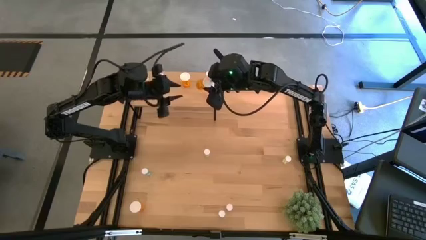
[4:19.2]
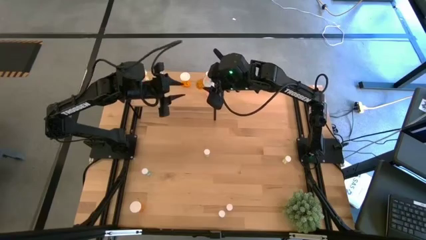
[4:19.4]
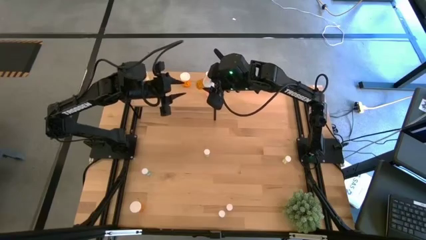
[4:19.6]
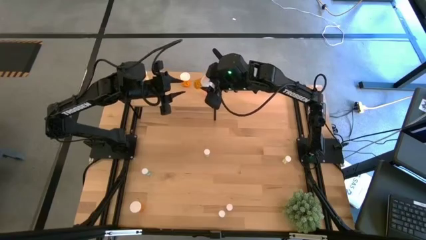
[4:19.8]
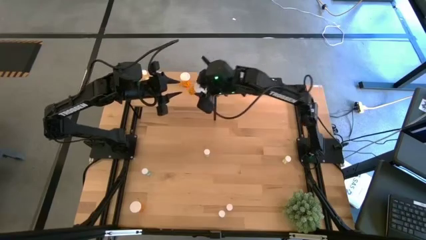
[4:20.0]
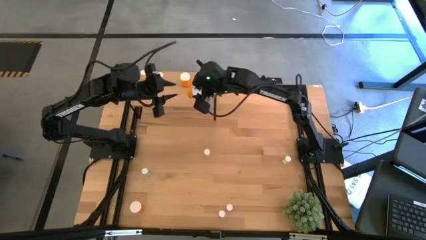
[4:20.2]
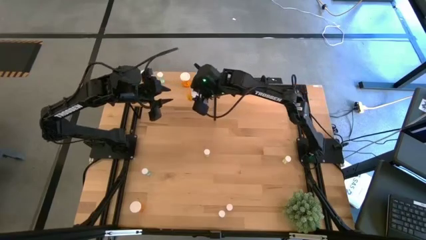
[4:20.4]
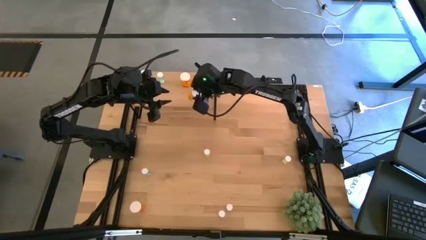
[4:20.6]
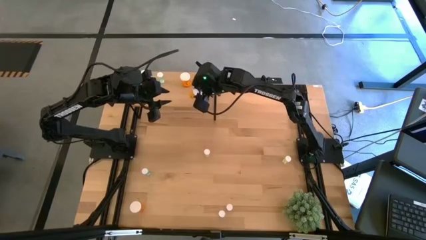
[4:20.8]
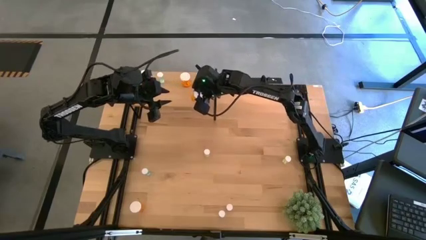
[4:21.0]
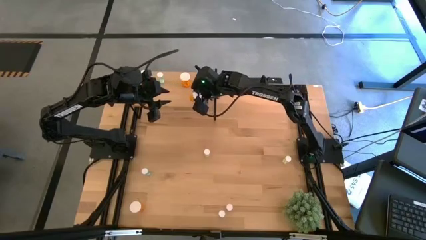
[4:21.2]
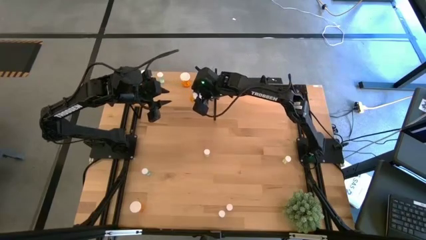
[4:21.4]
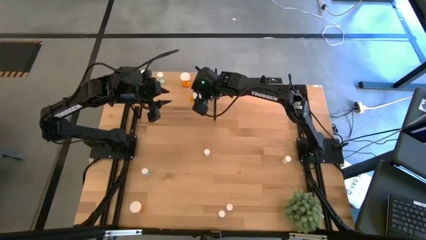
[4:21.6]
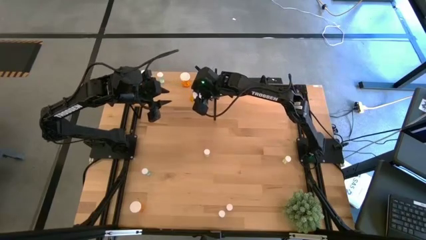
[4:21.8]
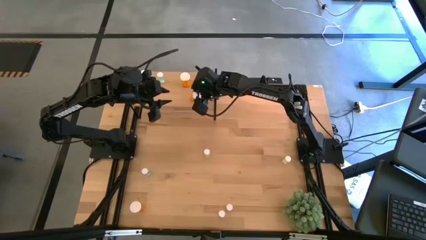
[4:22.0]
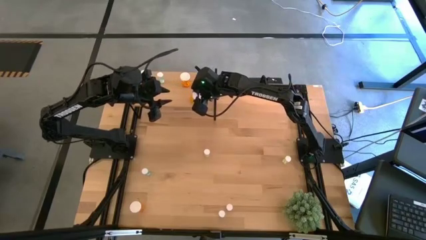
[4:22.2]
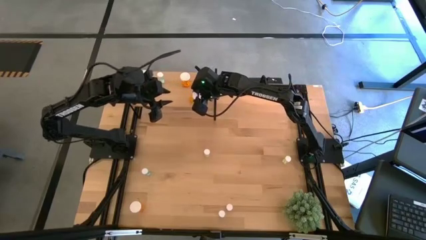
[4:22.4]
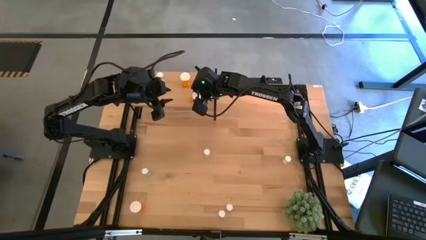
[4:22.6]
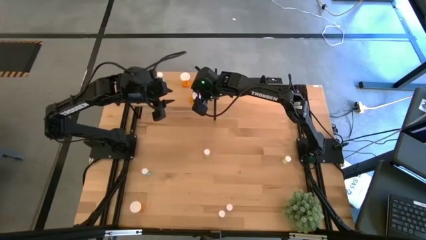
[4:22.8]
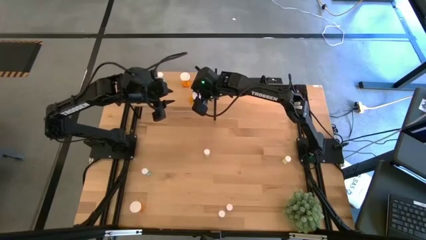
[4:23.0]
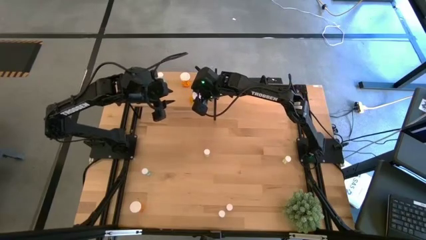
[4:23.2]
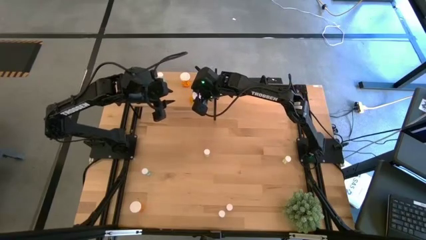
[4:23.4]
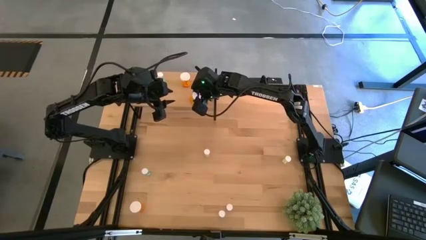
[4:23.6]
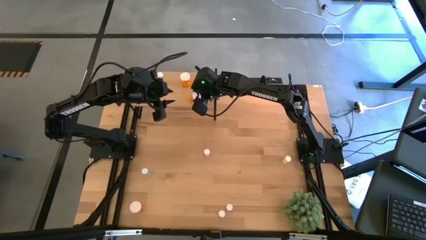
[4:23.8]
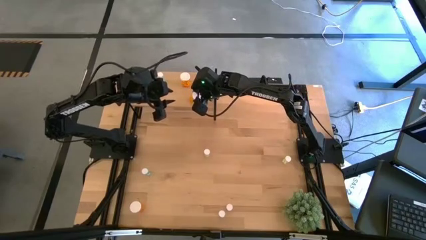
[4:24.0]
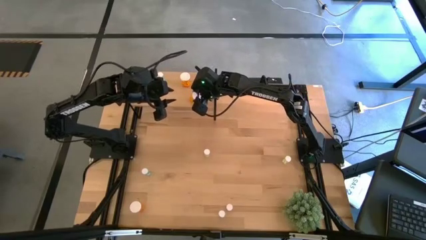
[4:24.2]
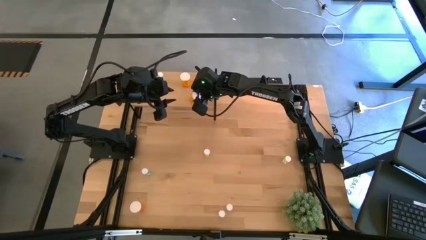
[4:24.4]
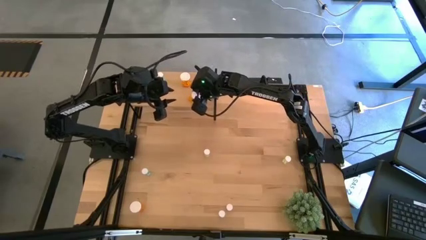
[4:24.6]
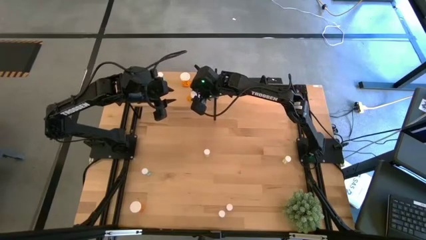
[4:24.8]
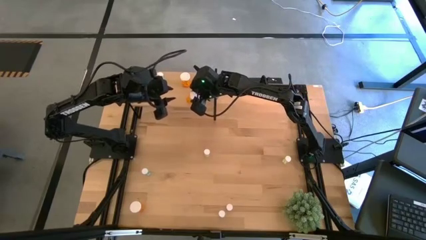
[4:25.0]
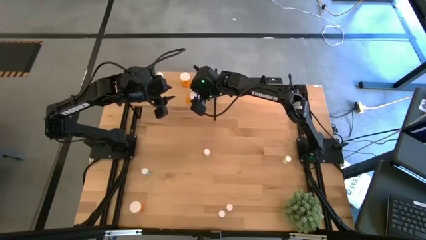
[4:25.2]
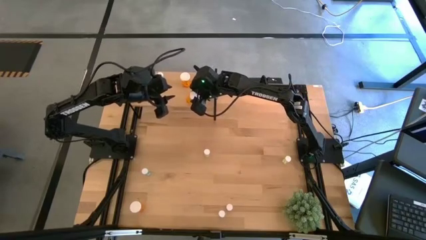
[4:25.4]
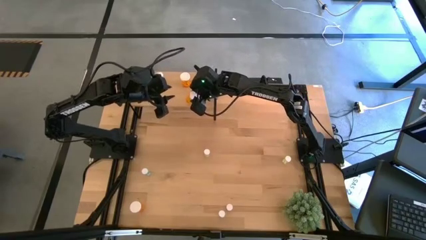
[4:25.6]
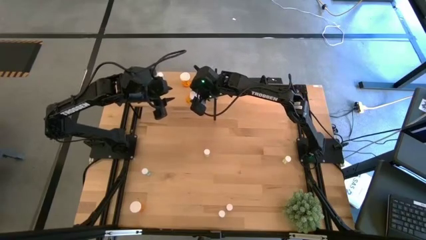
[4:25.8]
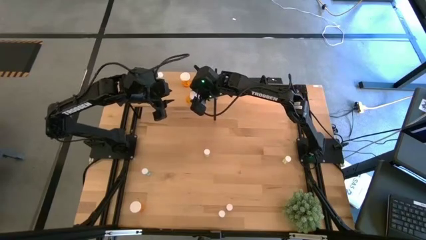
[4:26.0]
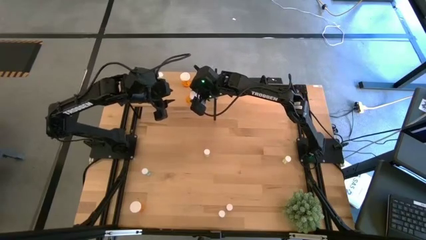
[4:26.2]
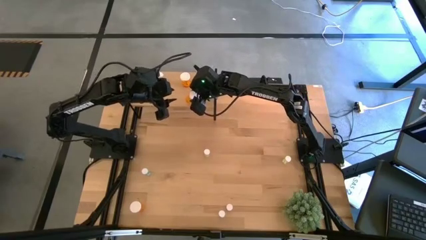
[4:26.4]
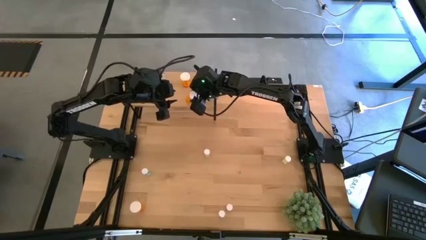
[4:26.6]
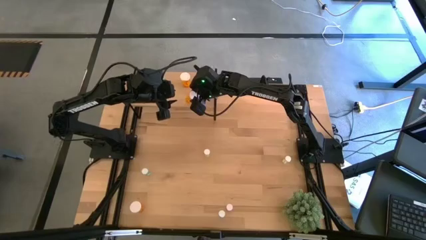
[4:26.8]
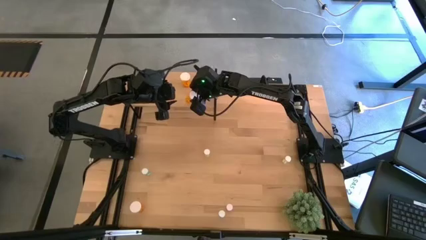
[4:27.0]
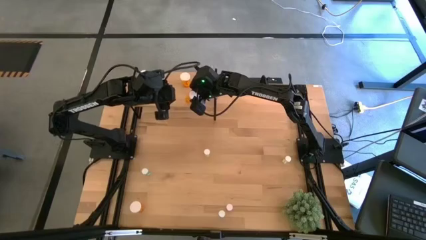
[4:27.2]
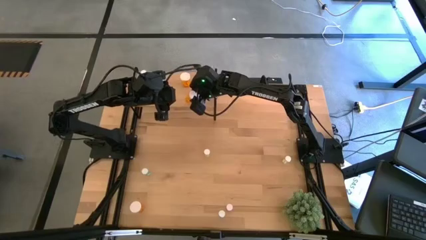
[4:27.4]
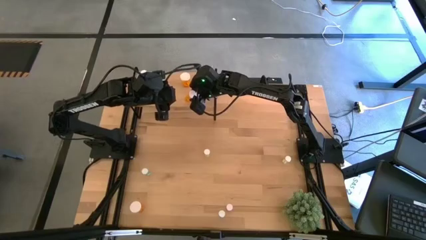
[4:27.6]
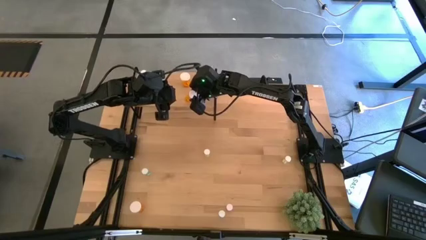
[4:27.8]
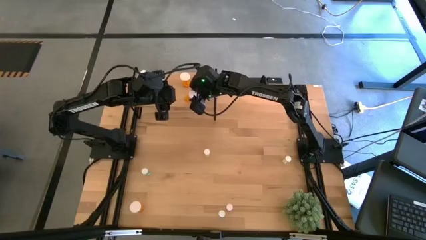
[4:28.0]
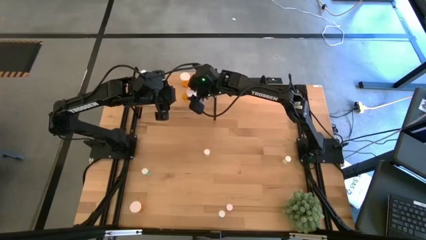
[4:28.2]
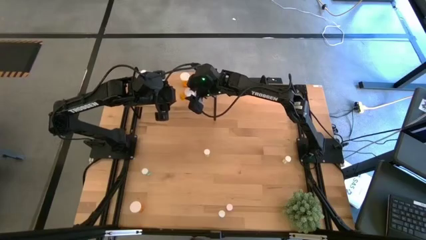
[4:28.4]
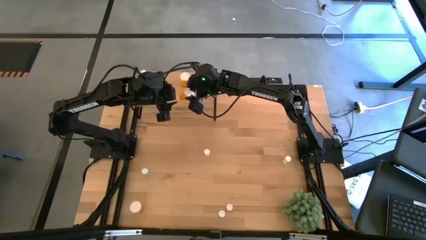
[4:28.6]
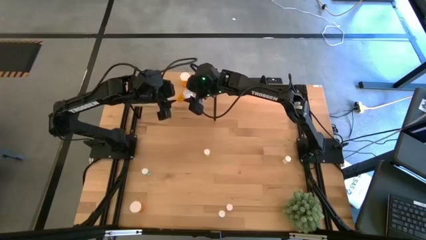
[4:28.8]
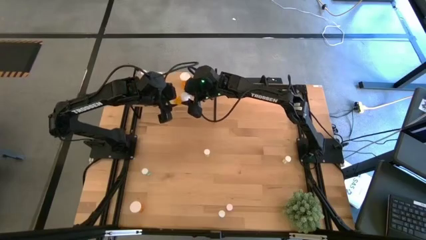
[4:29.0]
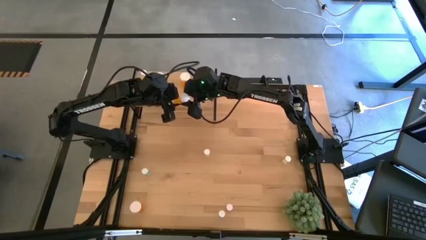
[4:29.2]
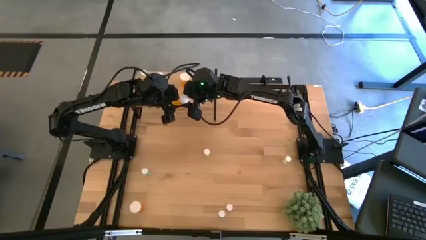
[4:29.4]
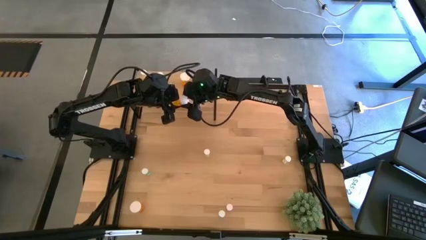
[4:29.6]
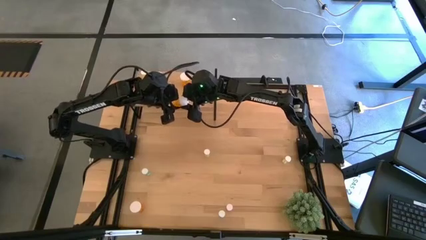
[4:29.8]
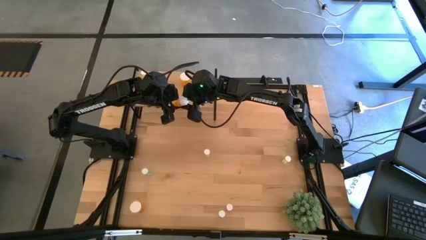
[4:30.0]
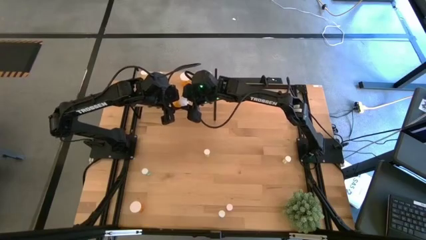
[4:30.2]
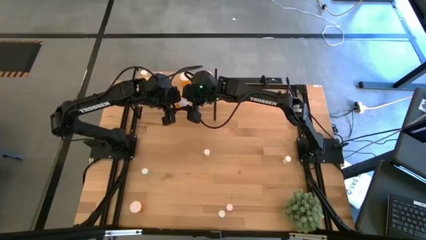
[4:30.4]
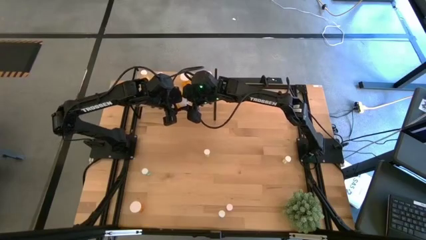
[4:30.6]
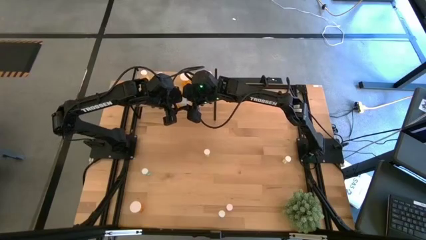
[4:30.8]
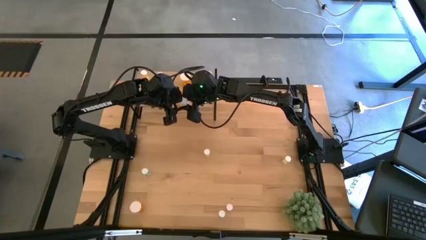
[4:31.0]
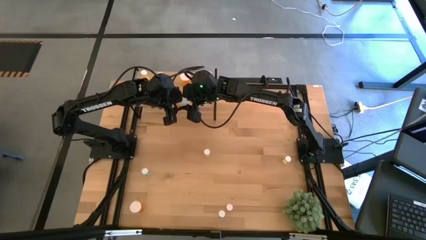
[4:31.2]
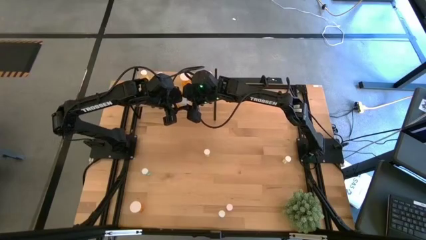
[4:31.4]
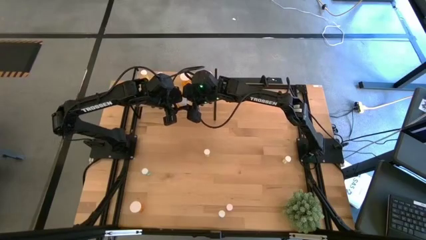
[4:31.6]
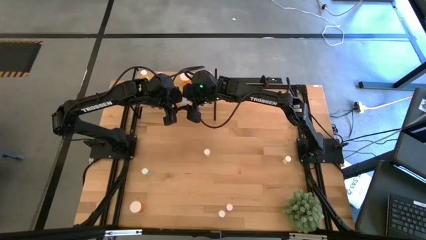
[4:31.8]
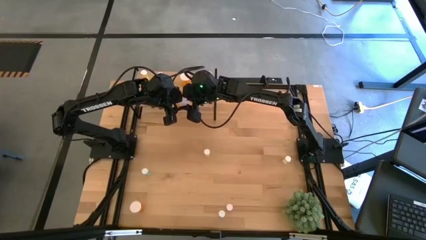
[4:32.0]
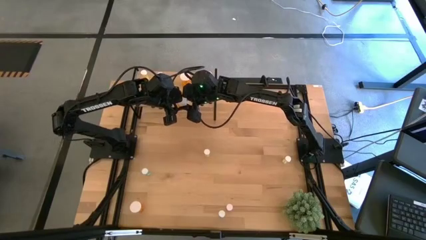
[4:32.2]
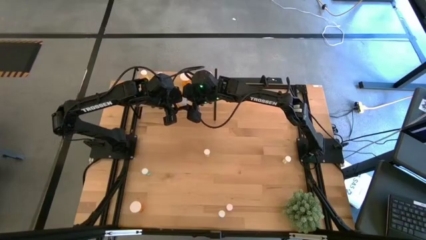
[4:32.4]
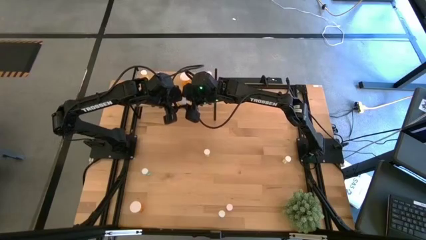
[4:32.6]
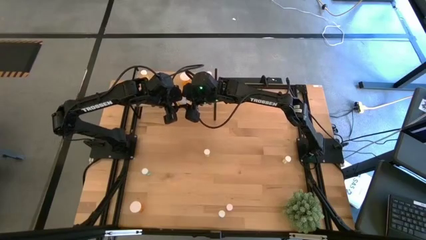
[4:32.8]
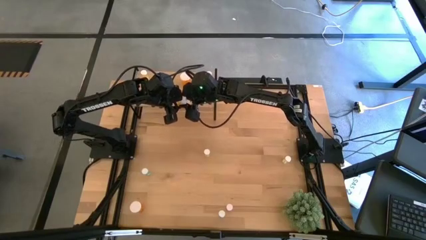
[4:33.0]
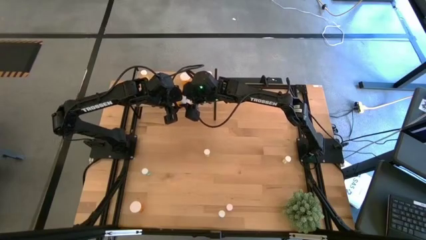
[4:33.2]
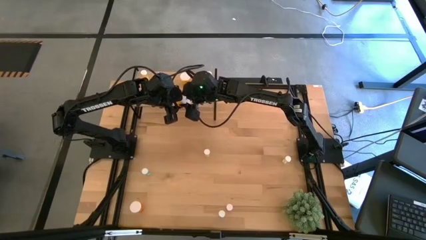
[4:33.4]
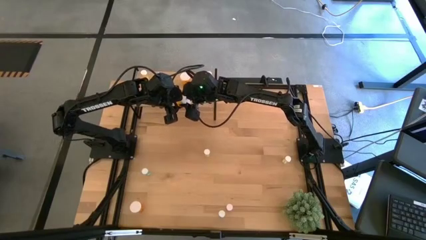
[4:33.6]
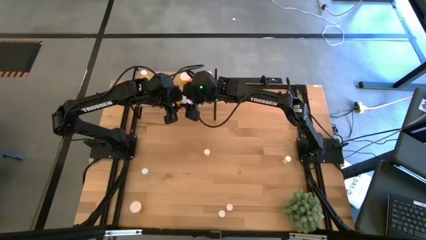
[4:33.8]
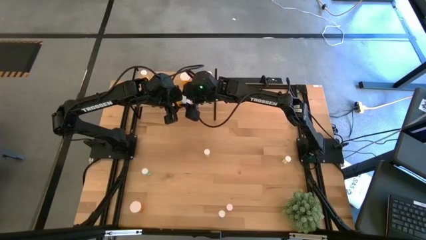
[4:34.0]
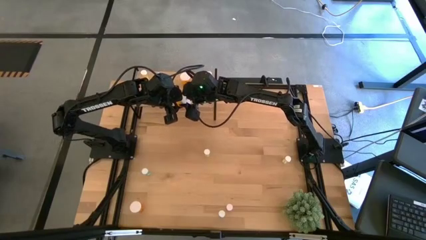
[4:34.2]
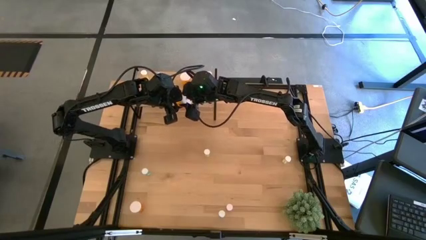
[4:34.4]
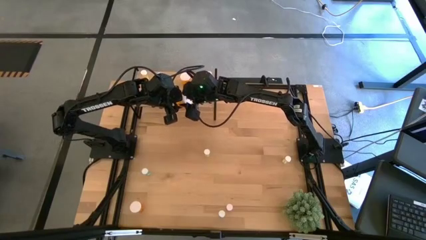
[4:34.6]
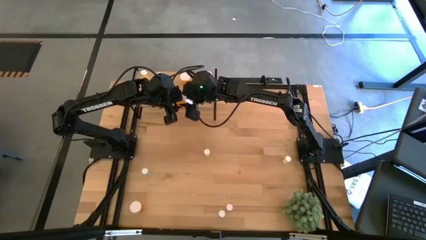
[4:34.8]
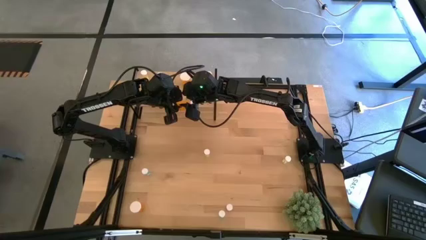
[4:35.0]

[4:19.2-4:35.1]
Task: Pick and place medicine bottles onto shelf by color
Put the top big orange pill bottle on the shelf aligned with the orange pill bottle on the shelf
